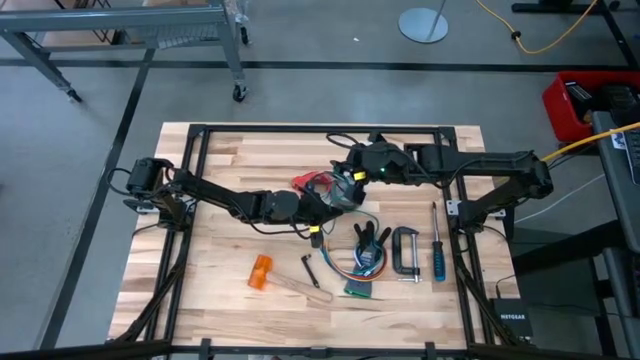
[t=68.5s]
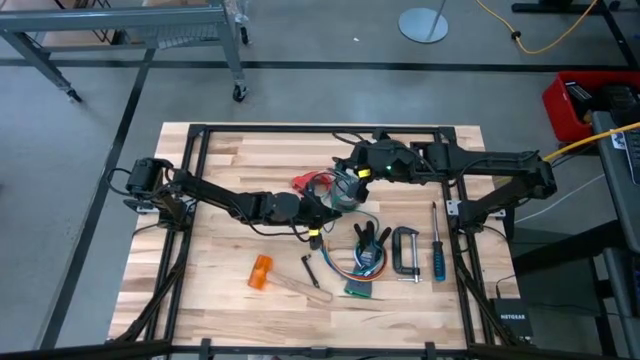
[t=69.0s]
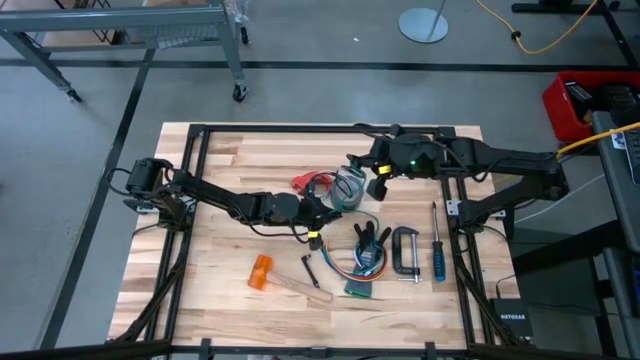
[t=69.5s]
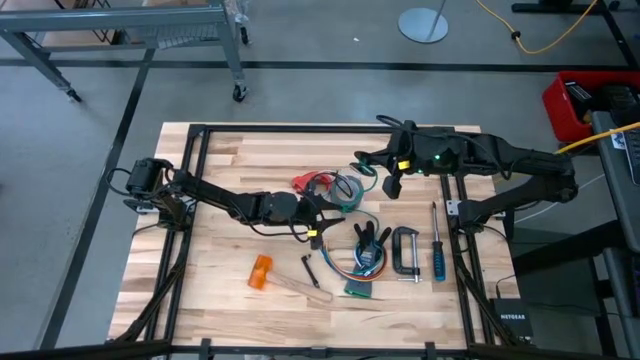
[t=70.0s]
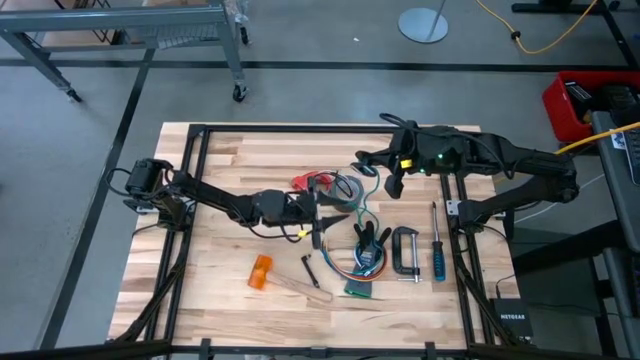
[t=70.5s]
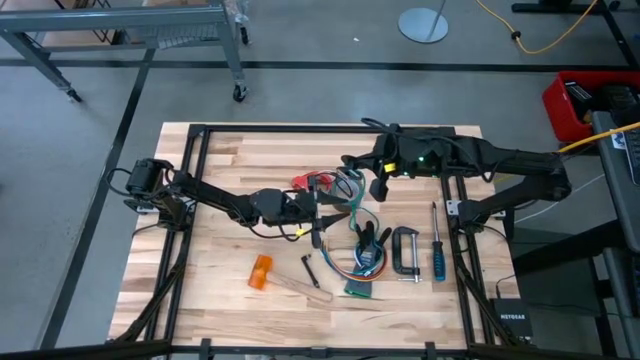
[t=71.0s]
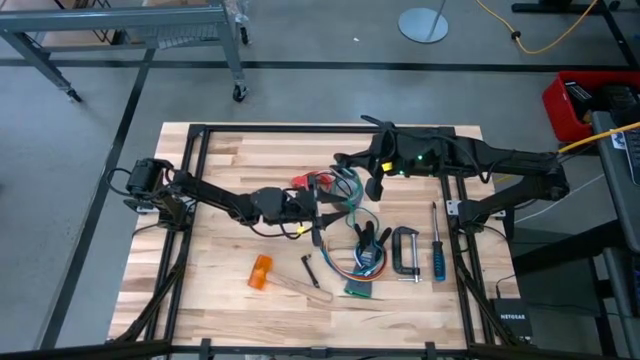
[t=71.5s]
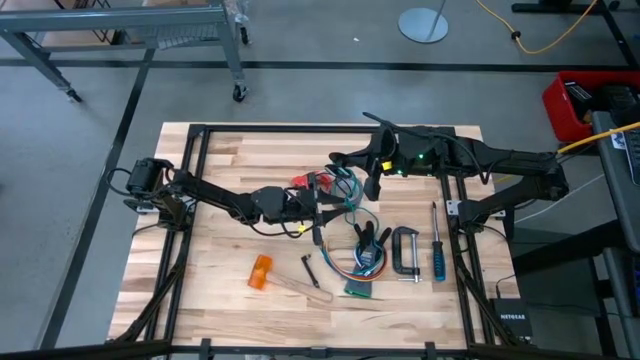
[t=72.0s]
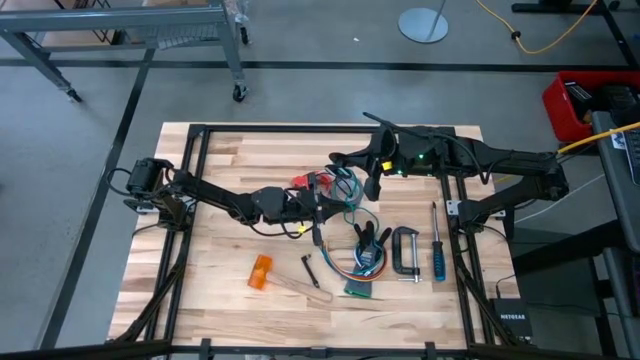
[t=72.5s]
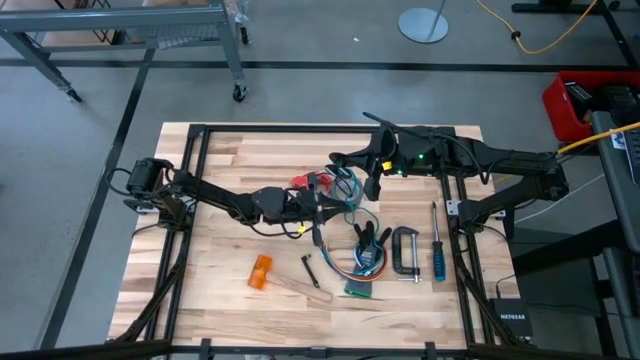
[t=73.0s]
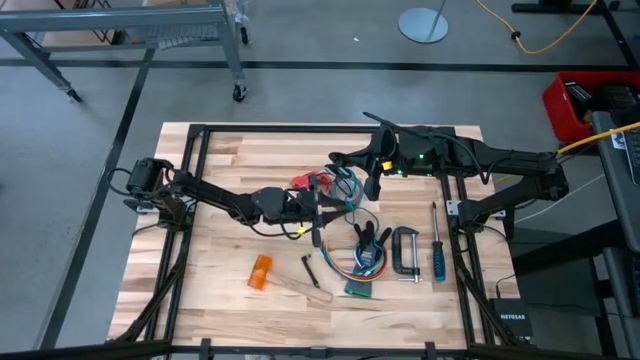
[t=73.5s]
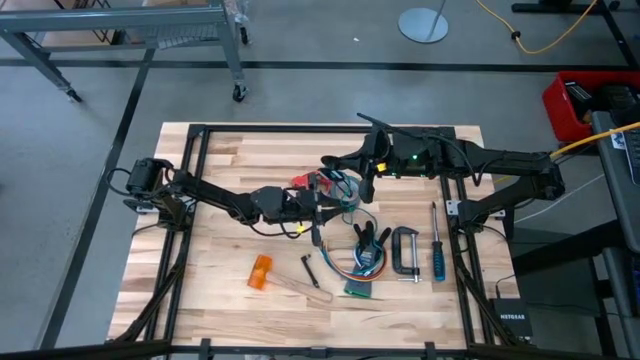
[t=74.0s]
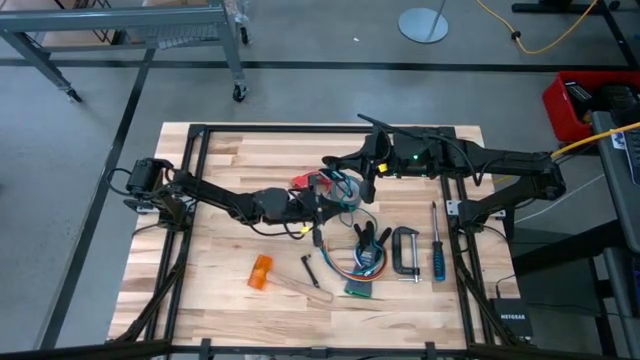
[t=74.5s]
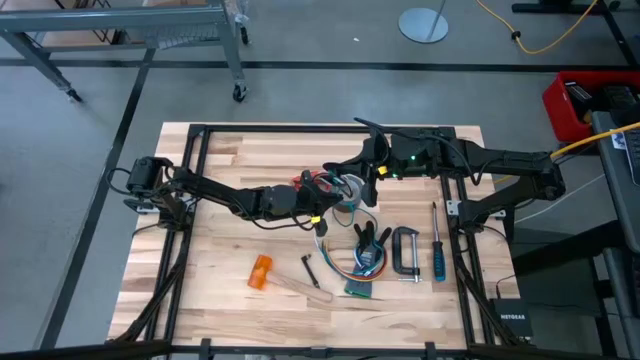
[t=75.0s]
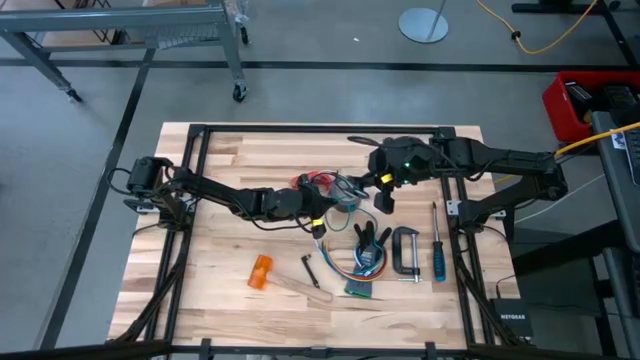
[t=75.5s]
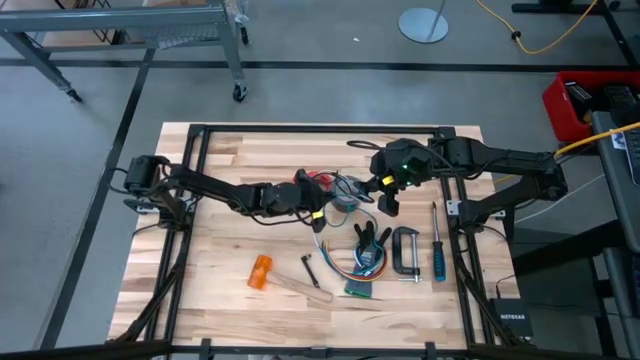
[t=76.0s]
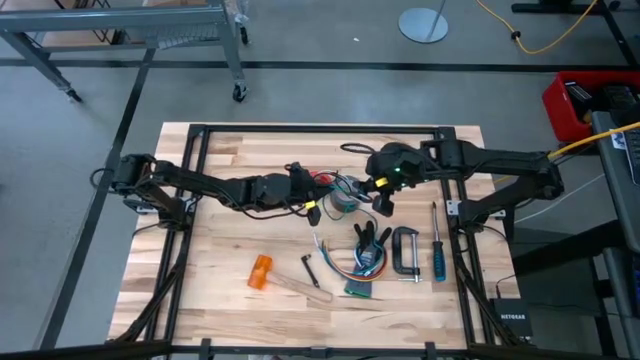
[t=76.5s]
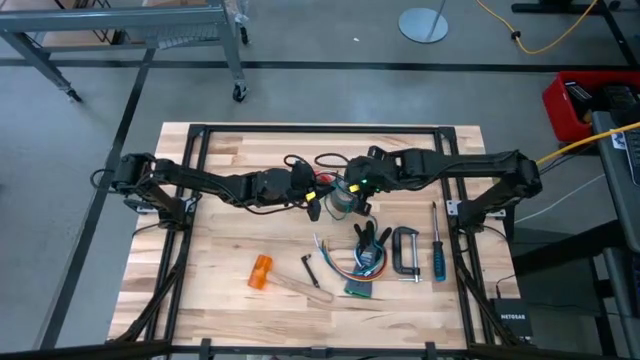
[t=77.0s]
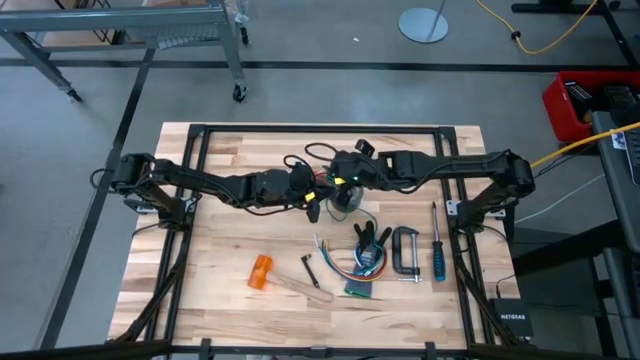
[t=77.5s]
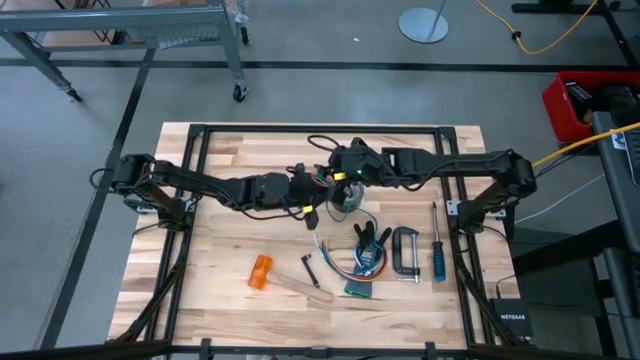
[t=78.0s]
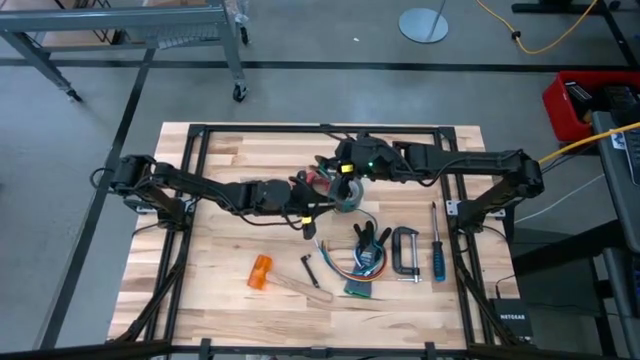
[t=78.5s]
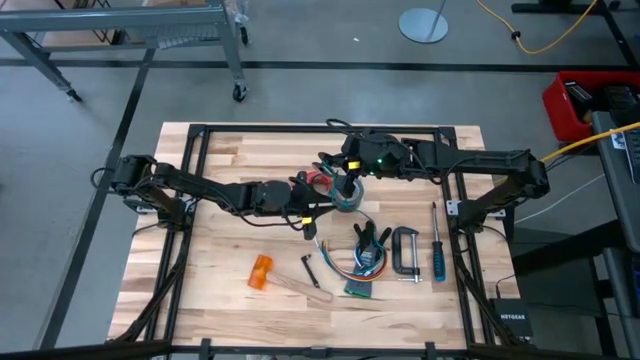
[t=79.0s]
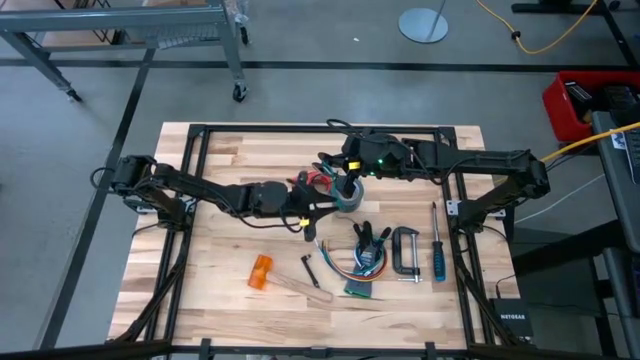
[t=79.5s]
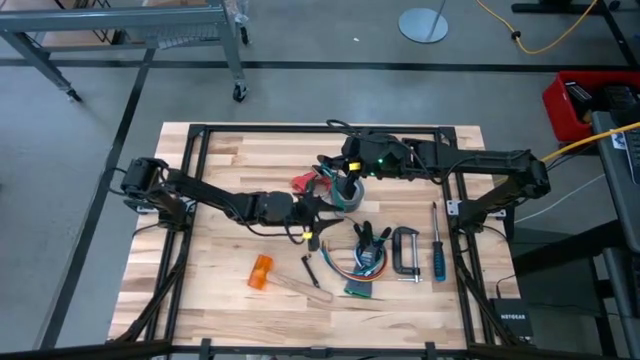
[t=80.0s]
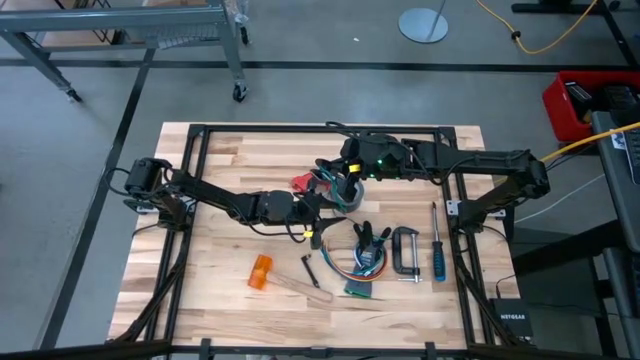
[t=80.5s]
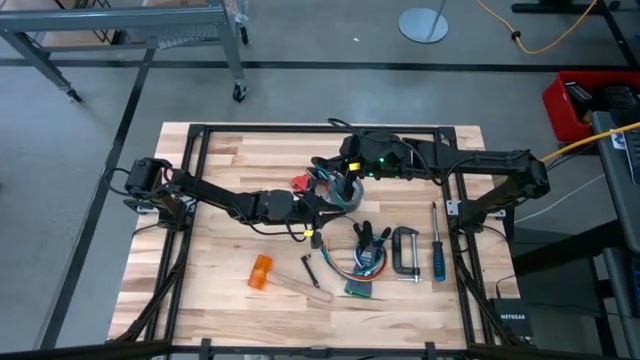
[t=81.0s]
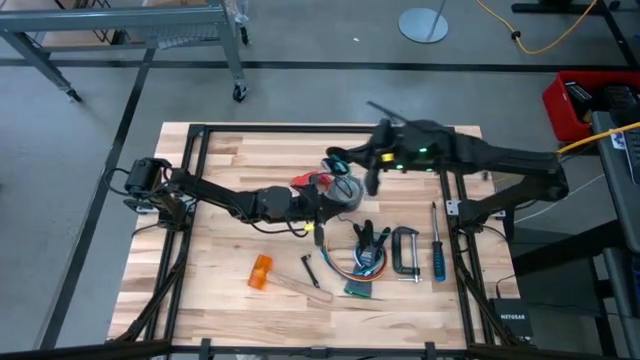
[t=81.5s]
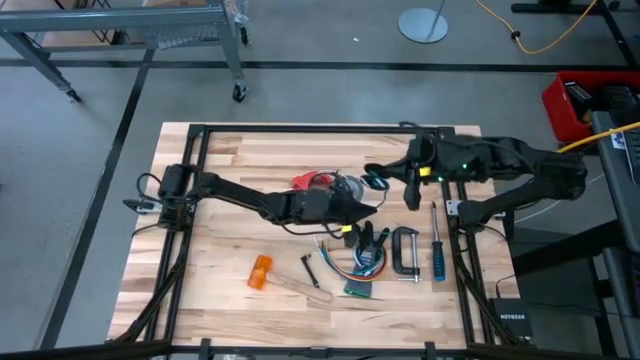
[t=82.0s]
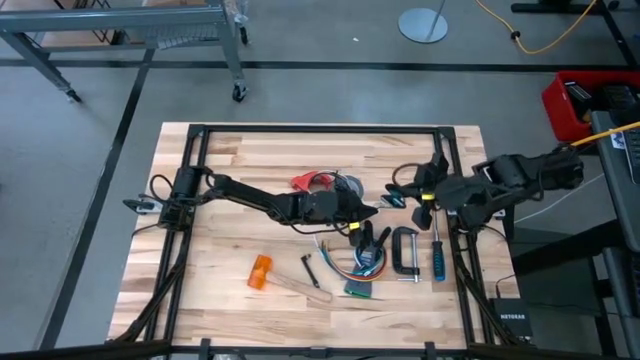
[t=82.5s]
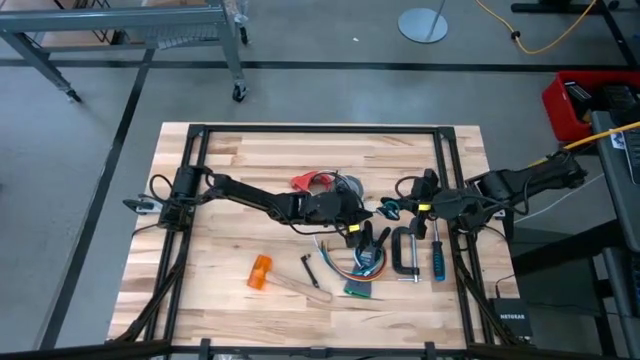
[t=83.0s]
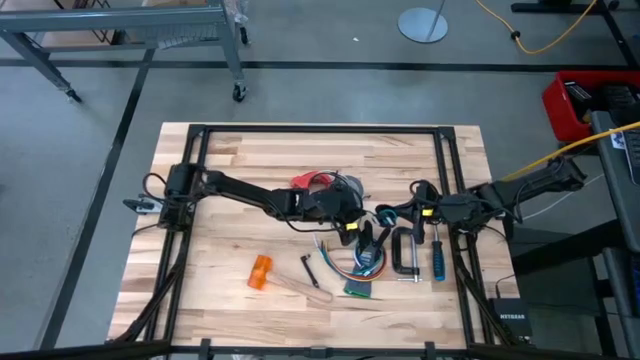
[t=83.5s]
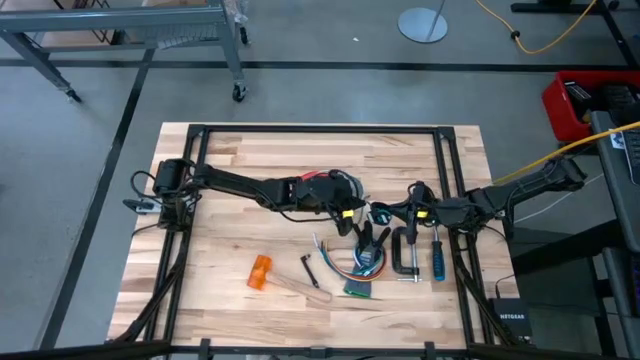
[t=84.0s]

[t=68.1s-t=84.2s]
Task: Coil cords
Coil the blue wire onto the spool

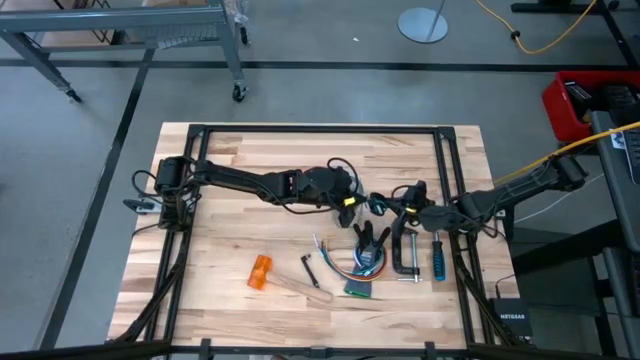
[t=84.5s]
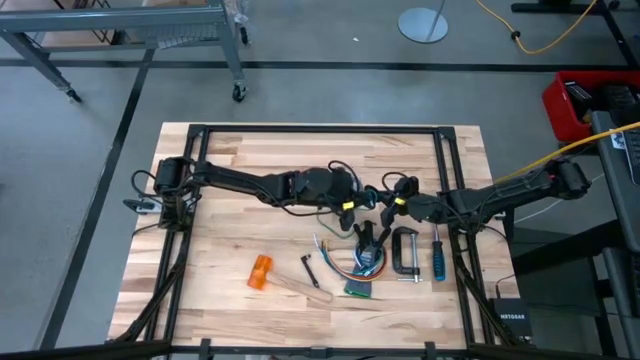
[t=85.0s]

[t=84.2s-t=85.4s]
Coil the blue wire onto the spool

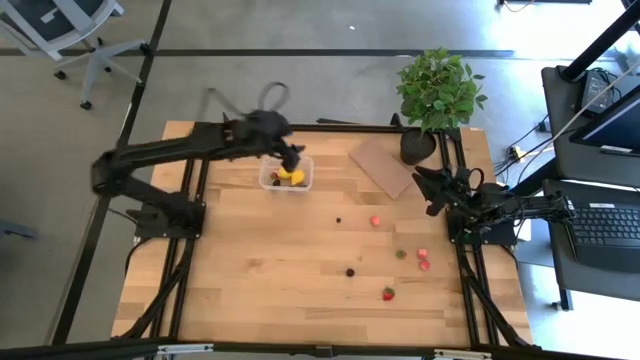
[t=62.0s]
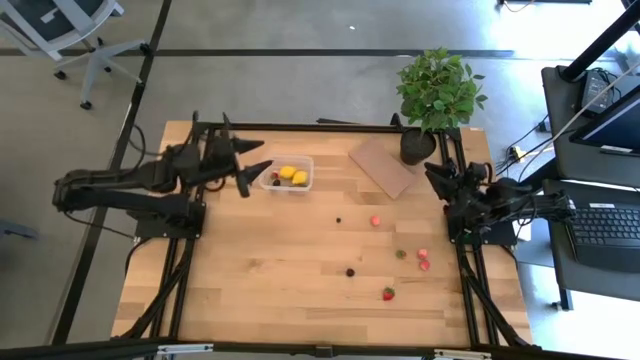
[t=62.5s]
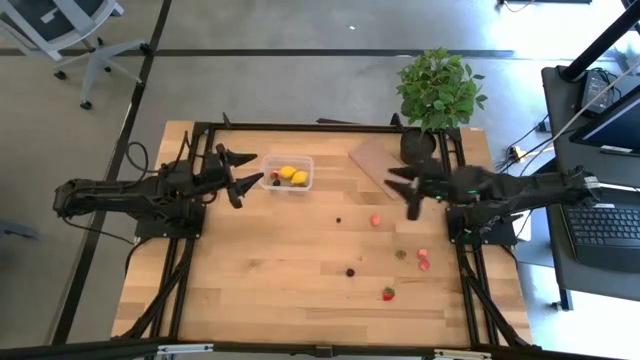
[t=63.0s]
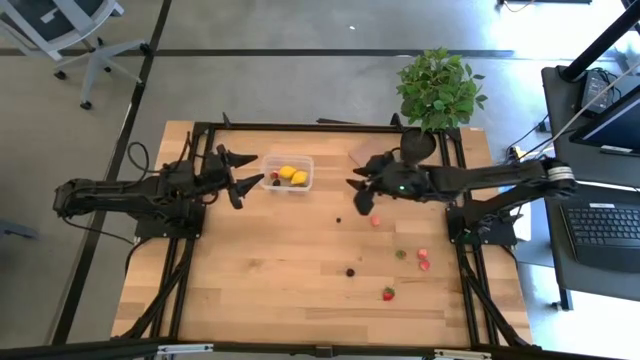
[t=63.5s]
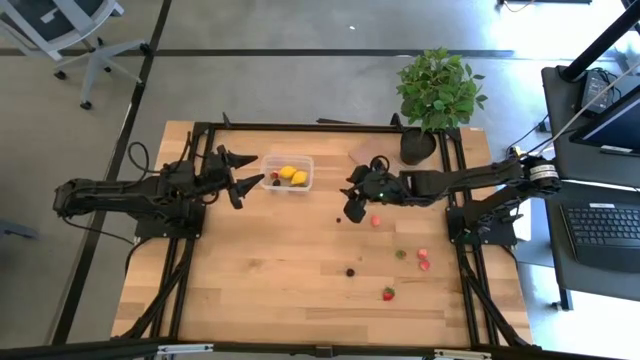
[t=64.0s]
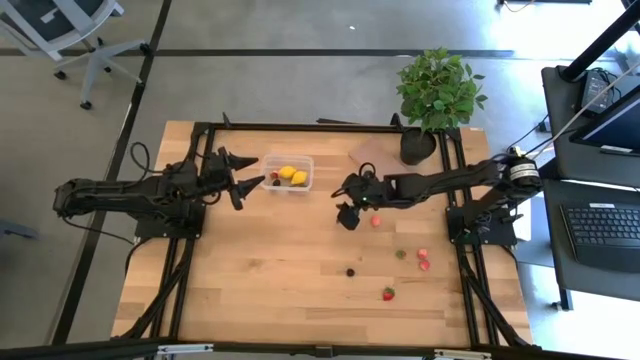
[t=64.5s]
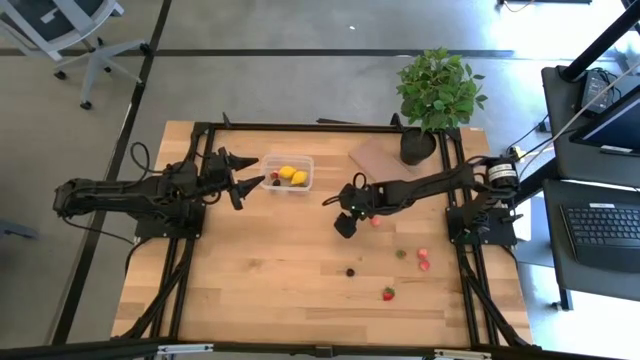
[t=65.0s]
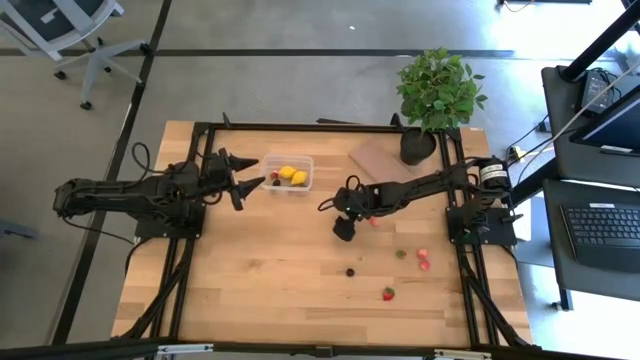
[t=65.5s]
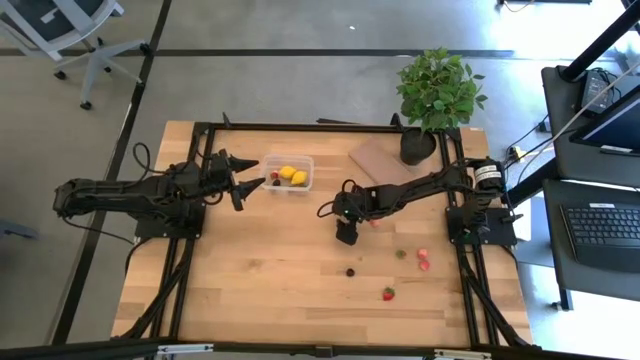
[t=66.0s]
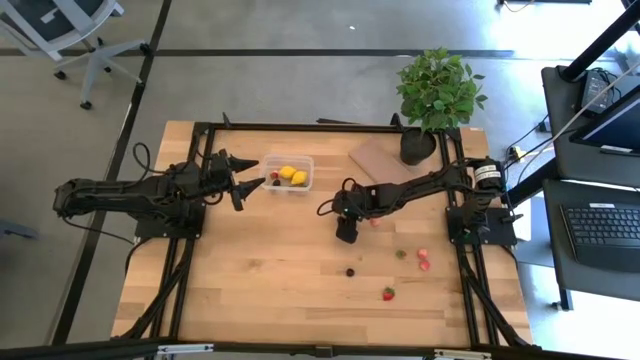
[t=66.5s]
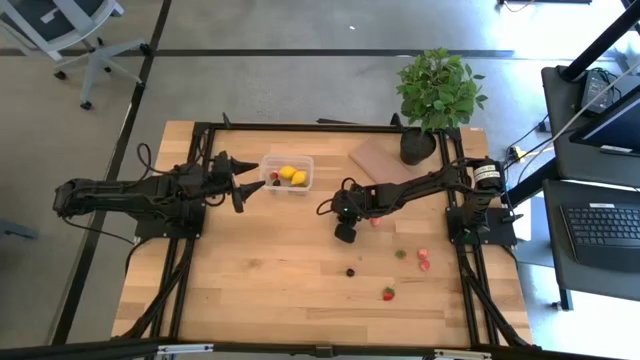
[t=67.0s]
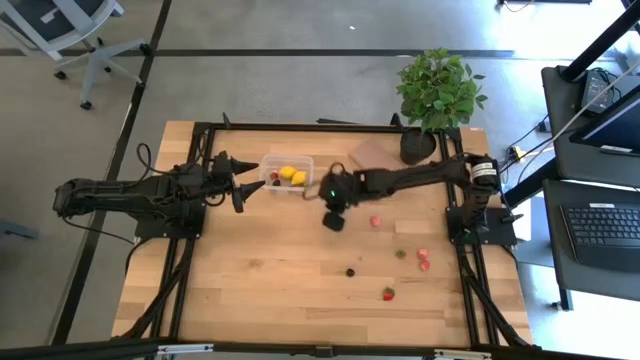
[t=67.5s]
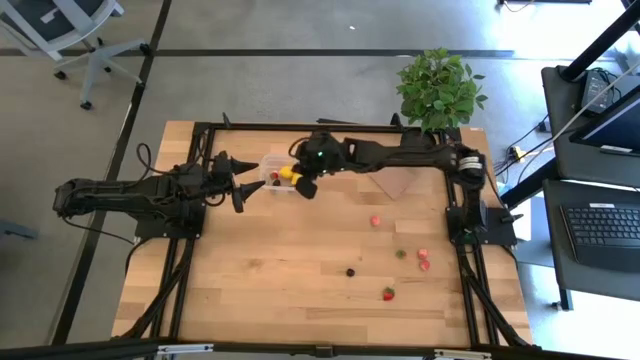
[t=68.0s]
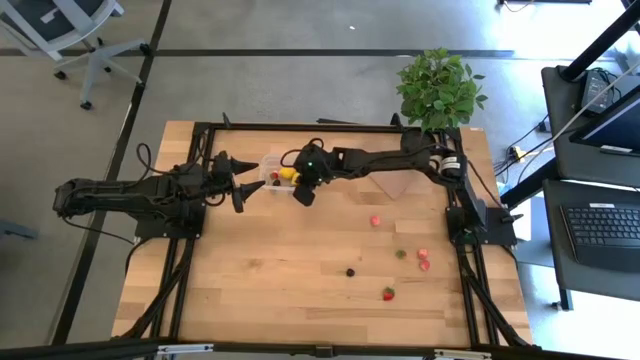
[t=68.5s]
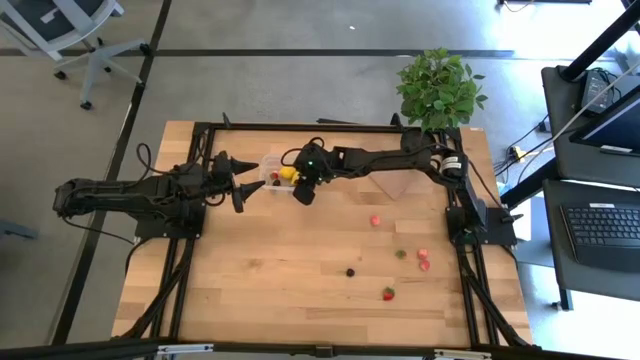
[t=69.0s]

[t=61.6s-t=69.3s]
Task: Pick and placing Produce into tupperware
Put the blueberry into the transparent bin
